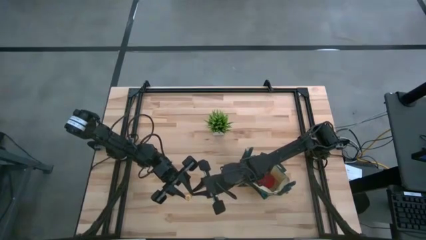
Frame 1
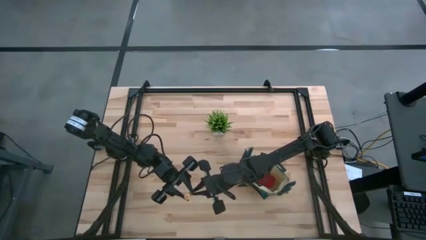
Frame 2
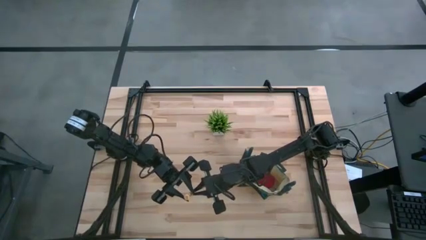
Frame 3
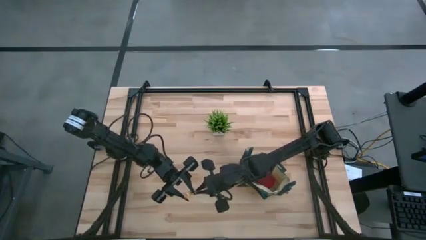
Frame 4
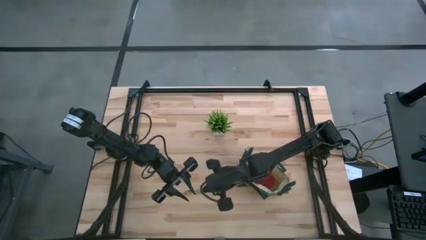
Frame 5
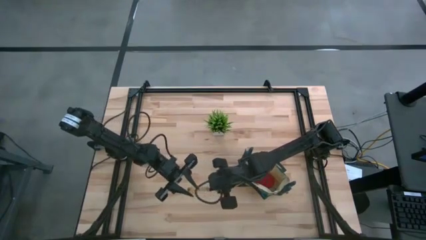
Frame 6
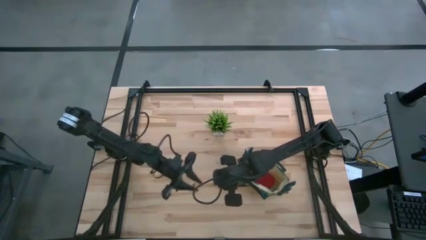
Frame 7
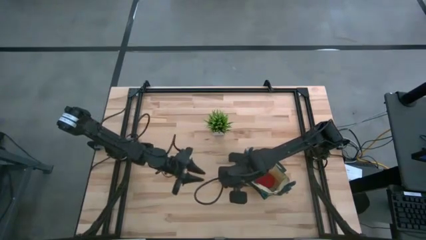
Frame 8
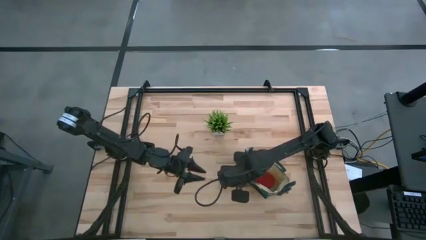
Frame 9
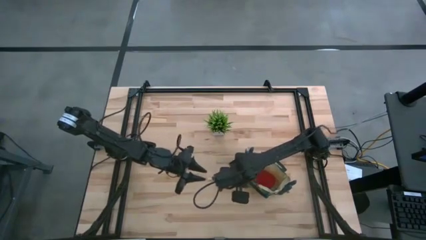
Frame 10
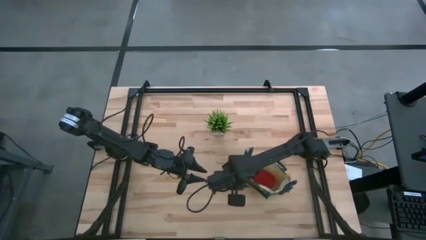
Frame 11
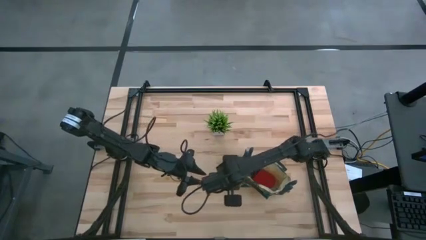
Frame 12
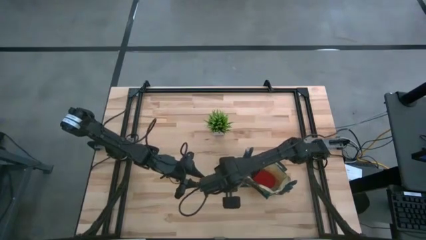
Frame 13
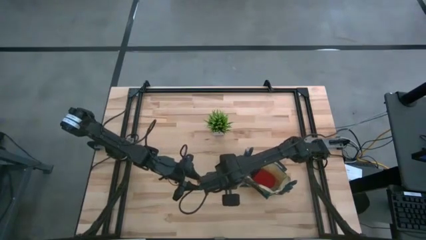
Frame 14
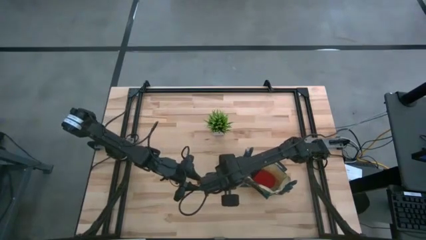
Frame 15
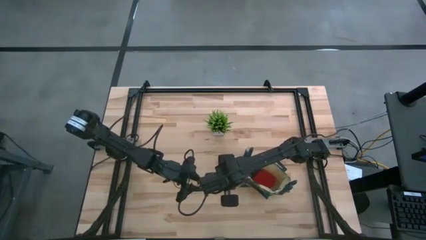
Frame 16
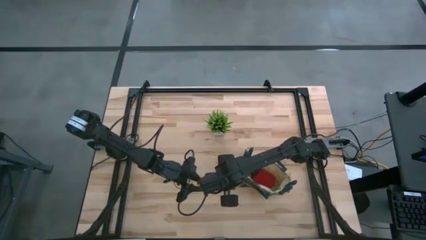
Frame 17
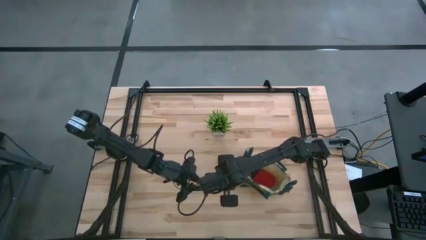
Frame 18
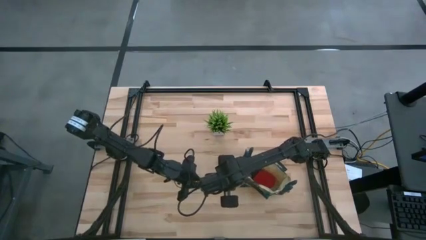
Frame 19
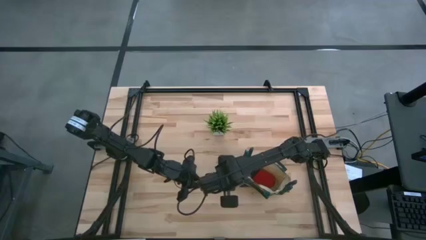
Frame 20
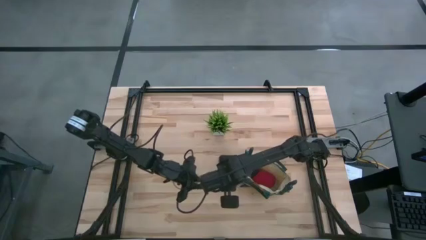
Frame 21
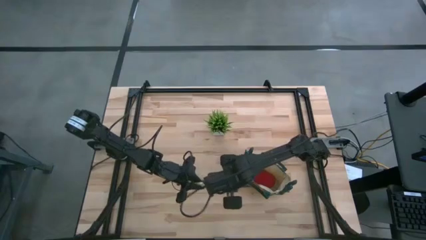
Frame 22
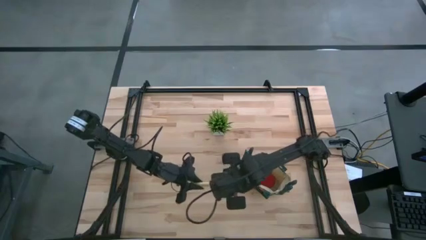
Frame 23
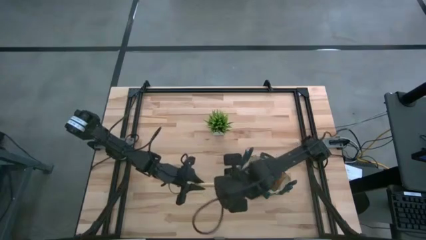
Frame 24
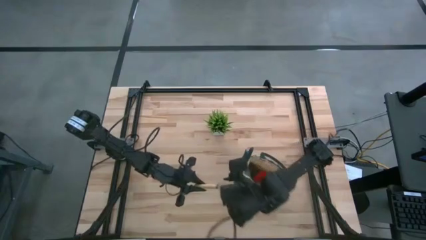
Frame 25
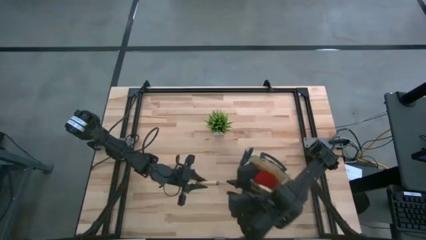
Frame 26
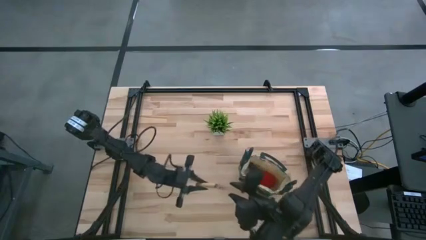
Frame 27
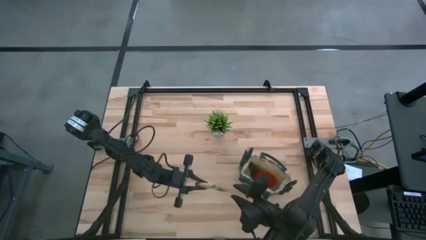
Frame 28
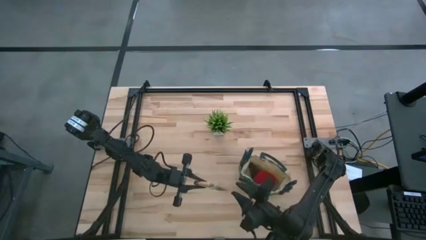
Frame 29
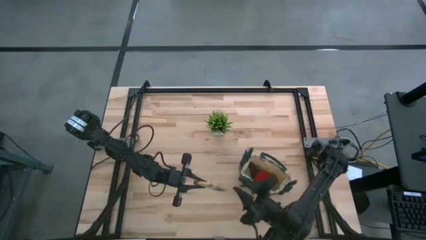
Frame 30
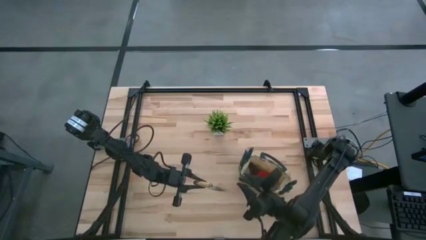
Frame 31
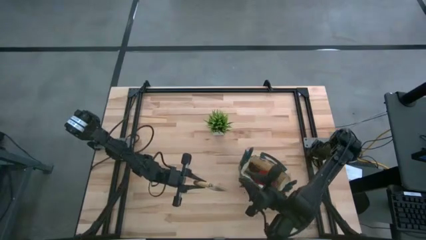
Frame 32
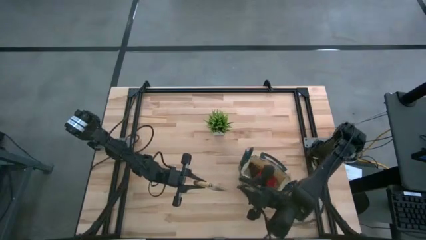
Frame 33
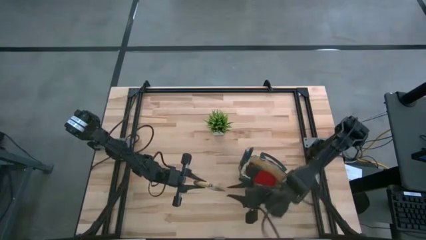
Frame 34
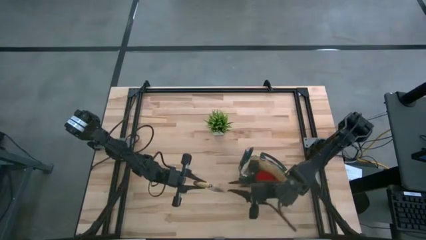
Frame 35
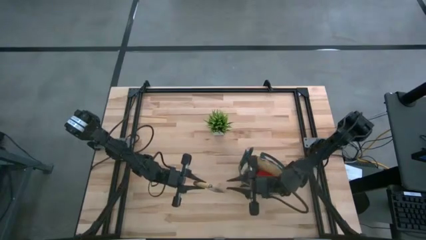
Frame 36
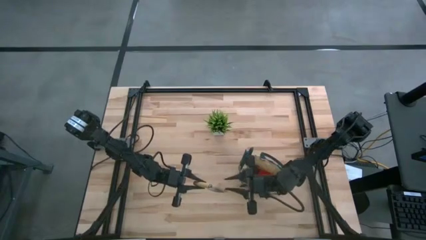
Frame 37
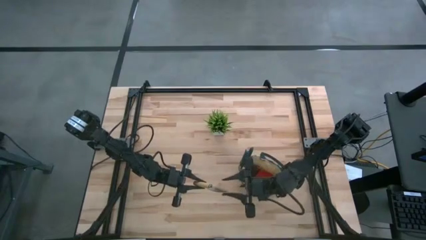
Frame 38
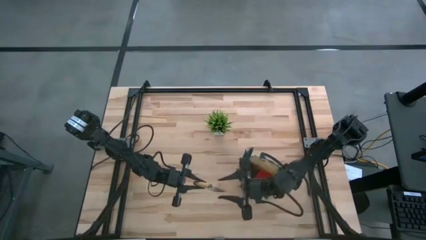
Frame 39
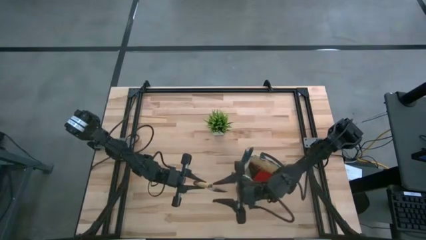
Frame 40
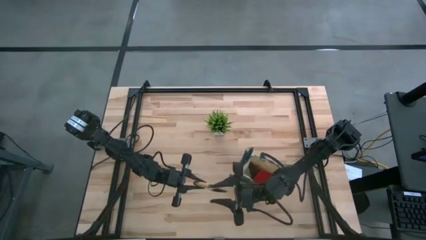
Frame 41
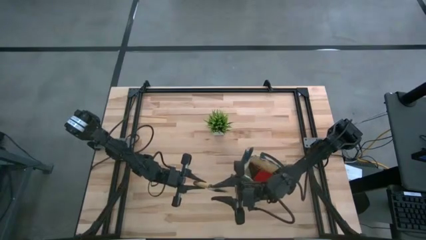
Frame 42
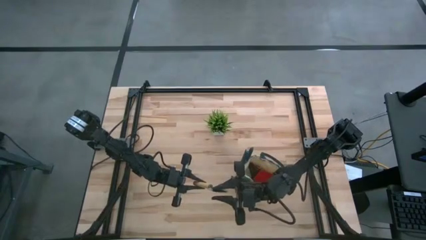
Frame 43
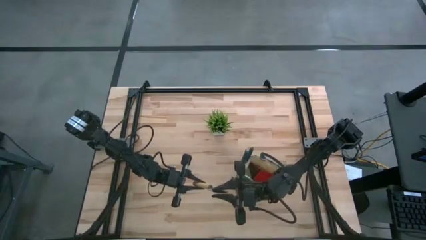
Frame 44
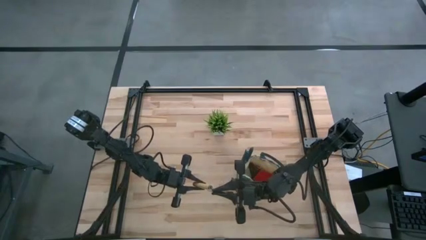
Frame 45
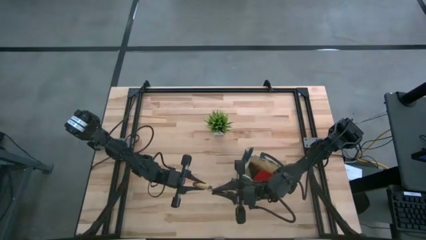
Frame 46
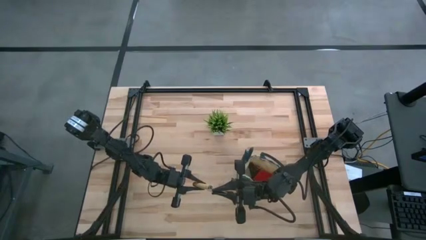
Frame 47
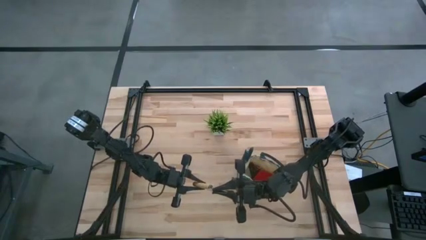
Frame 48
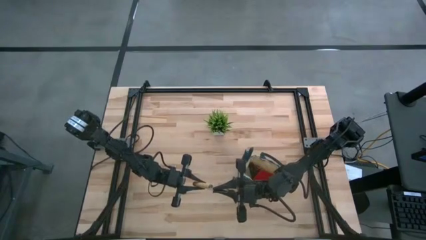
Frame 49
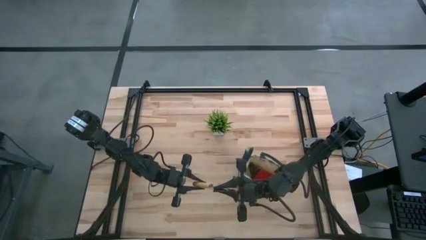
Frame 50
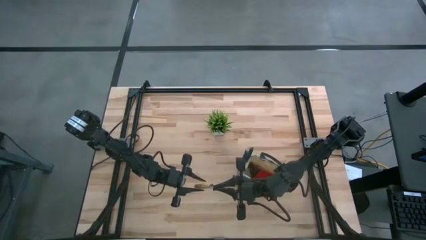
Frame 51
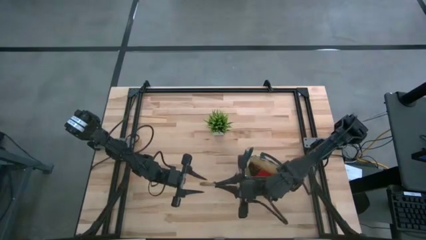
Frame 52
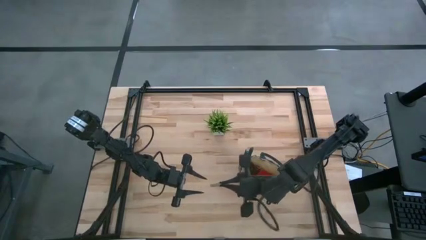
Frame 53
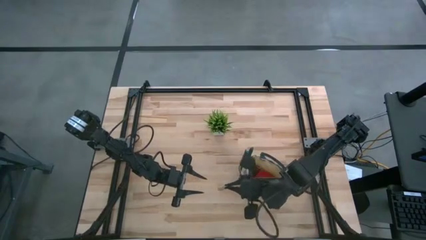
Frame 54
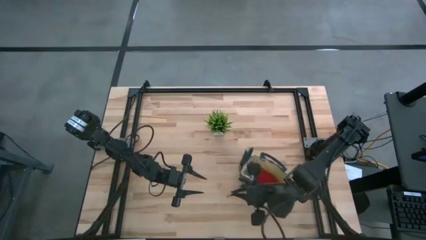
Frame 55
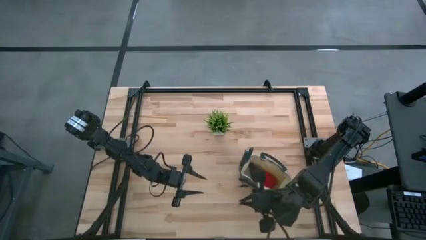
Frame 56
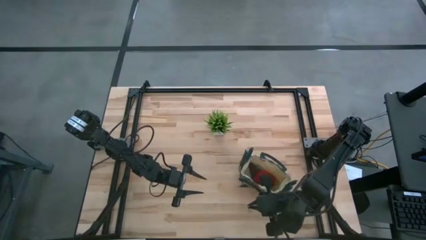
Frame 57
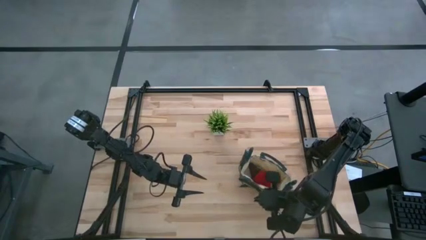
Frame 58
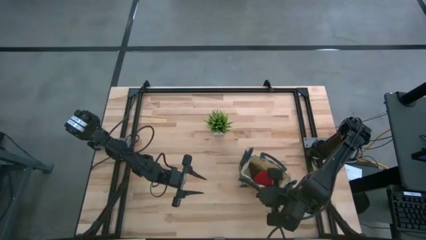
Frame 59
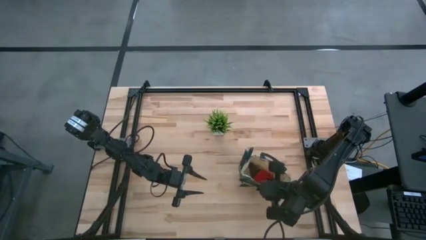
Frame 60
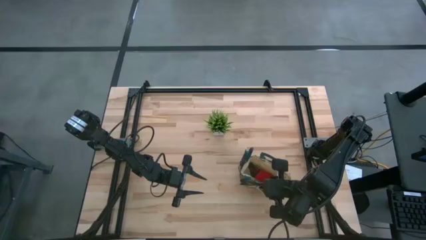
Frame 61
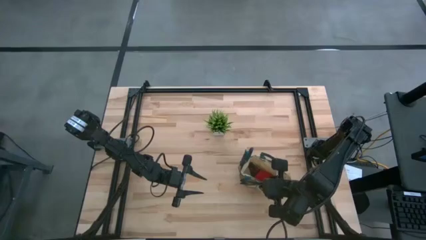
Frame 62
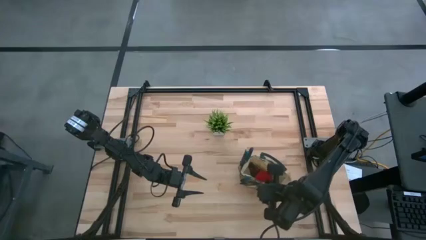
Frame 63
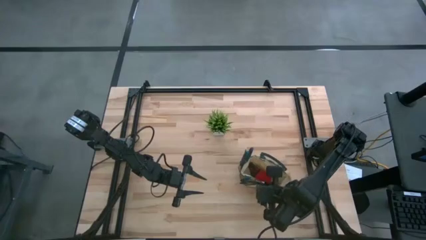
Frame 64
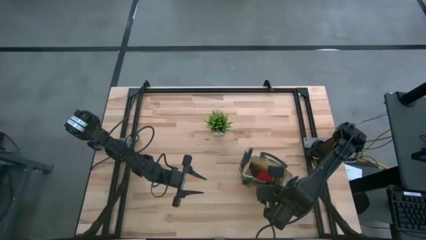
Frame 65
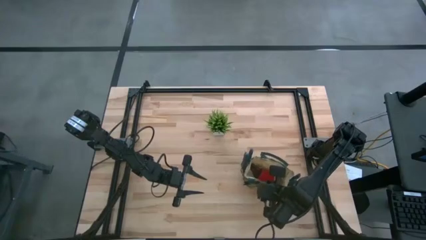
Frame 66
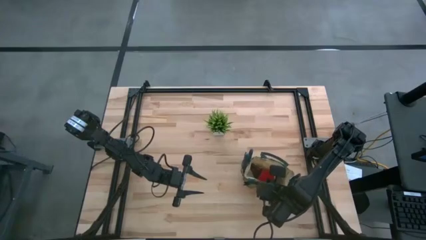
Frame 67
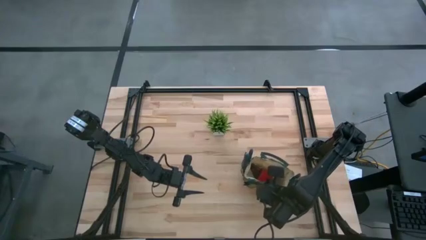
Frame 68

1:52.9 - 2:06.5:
Task: Pick & Place Garden tools in Gardening bag
Put the brown trowel into the green gardening bag

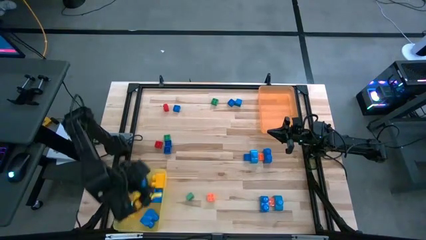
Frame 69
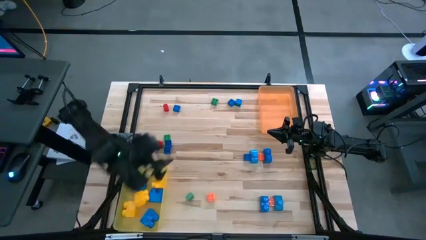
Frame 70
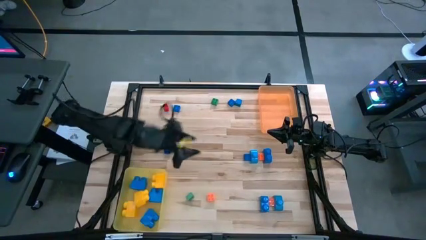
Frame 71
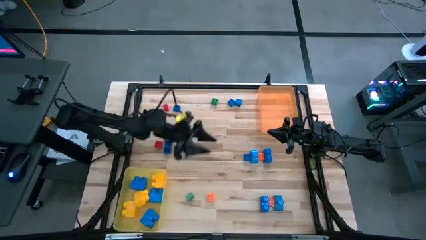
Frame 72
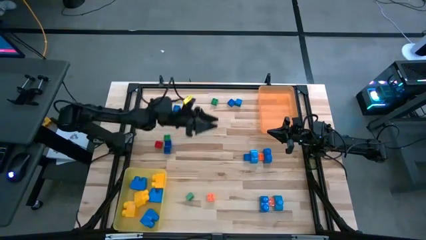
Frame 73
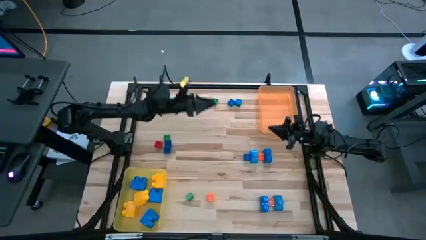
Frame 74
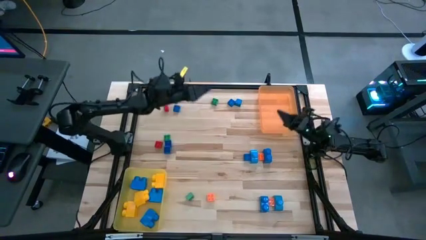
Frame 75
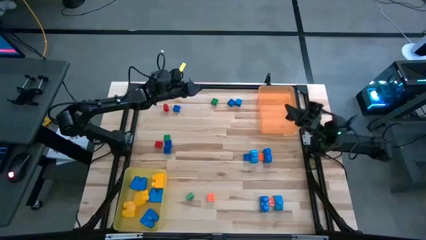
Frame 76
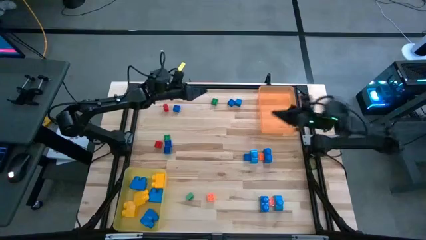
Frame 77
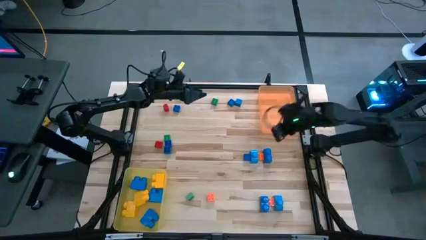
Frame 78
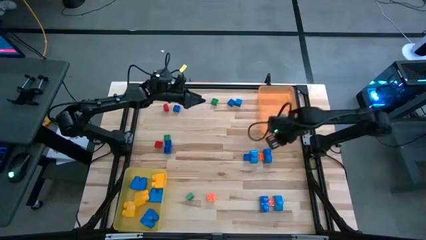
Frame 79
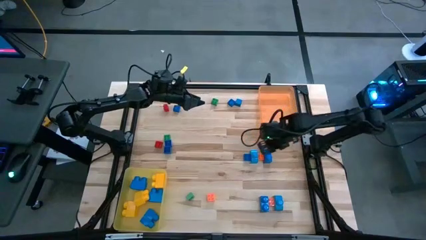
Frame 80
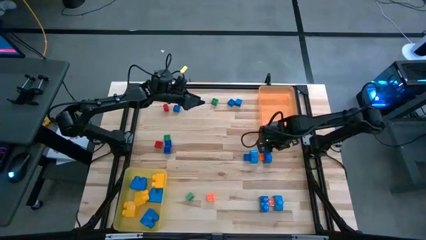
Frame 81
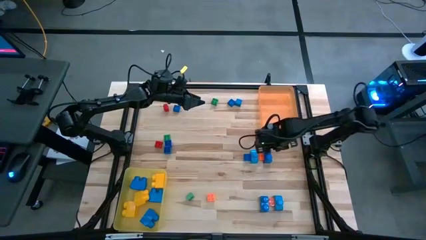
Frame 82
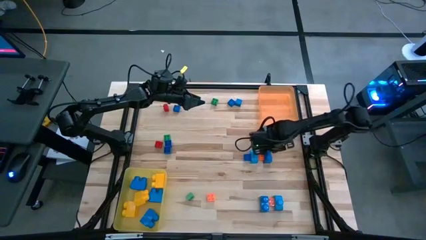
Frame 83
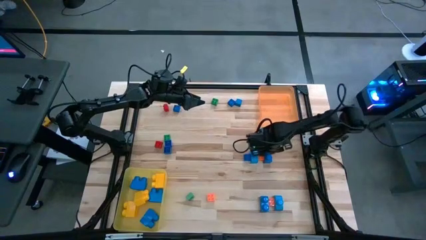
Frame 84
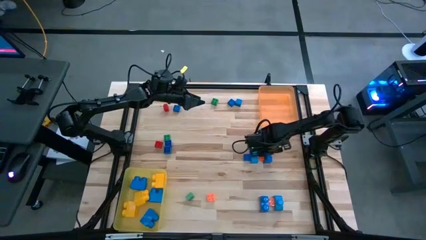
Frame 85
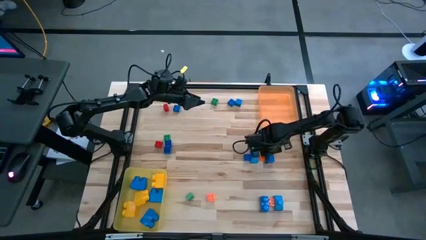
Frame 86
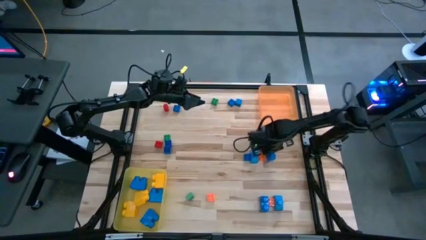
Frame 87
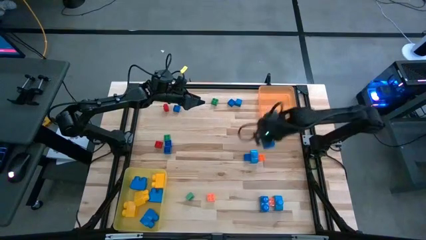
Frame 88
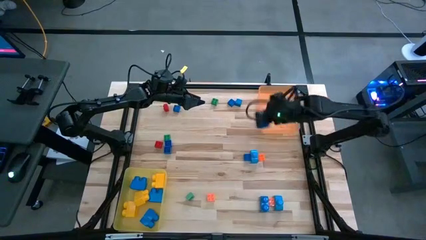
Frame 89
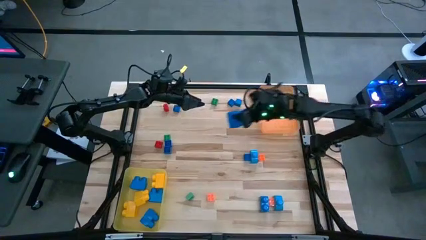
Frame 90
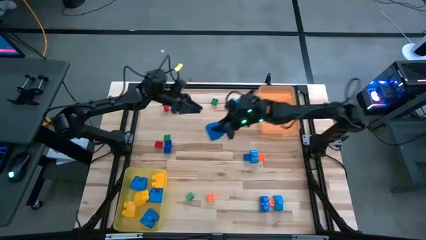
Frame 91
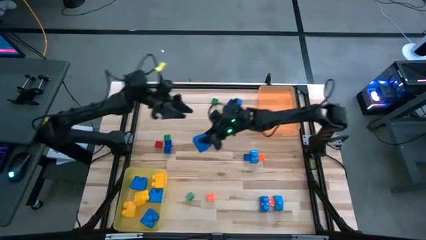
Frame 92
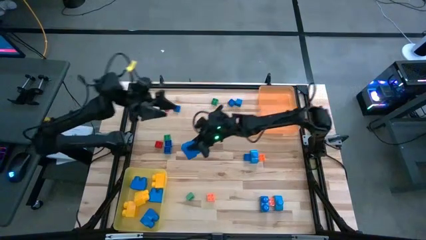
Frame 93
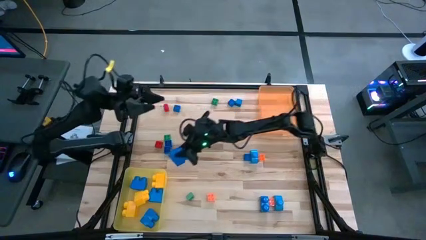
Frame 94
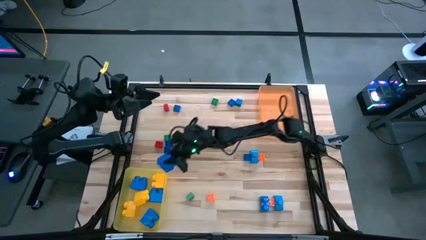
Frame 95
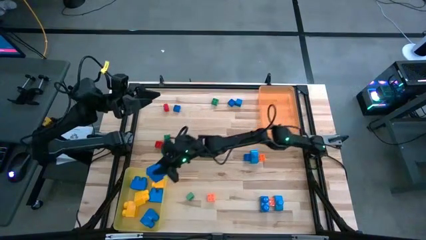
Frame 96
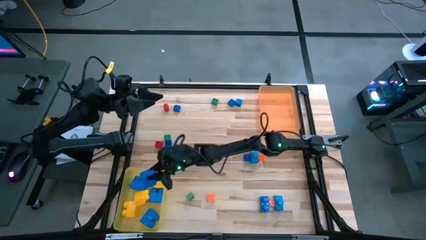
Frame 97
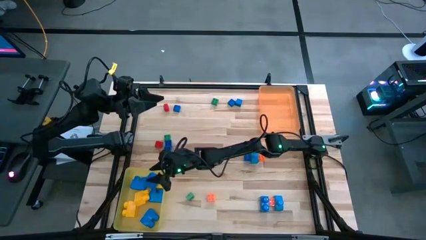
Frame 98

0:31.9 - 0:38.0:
Task: Sort blocks by size
Put the large blue game piece into the yellow bin
